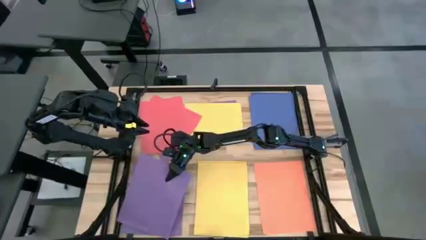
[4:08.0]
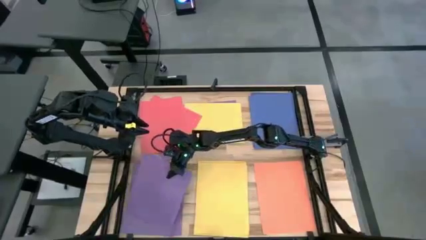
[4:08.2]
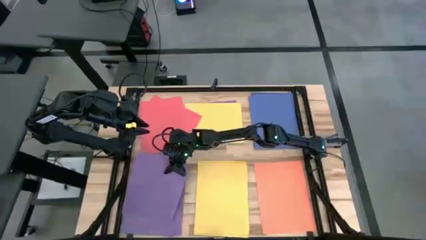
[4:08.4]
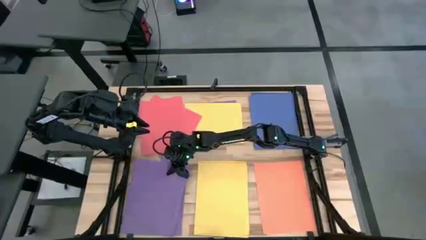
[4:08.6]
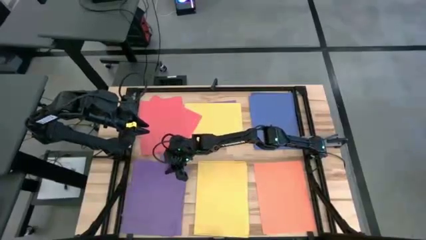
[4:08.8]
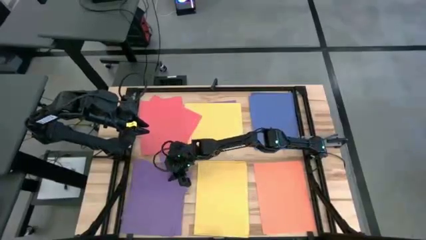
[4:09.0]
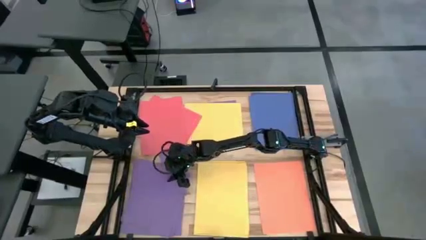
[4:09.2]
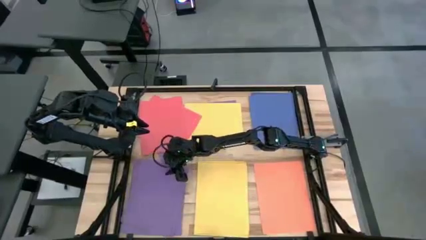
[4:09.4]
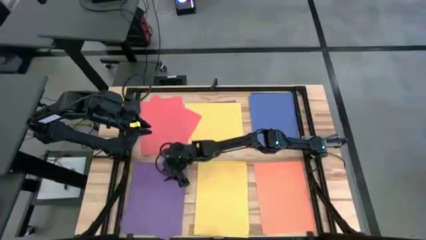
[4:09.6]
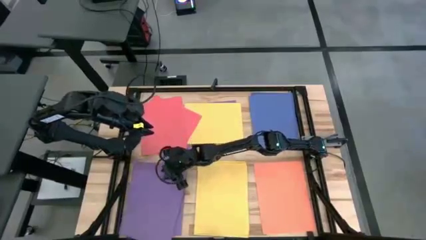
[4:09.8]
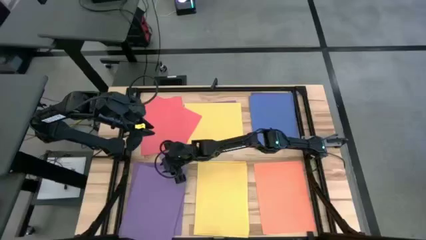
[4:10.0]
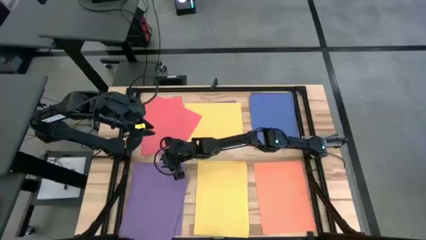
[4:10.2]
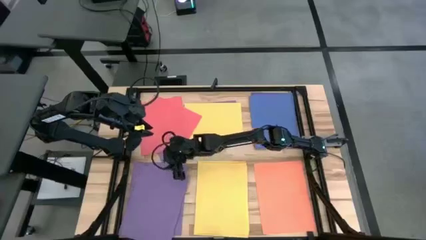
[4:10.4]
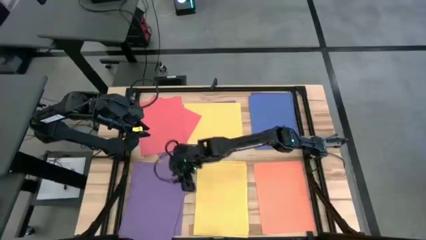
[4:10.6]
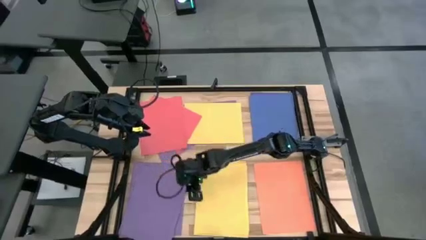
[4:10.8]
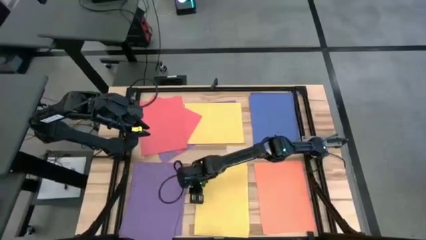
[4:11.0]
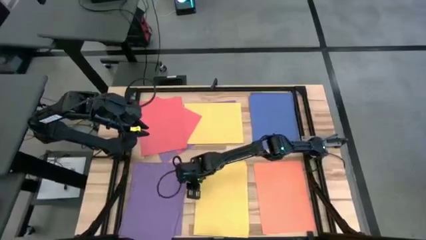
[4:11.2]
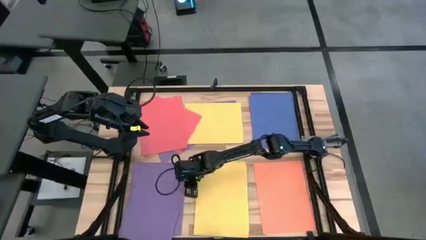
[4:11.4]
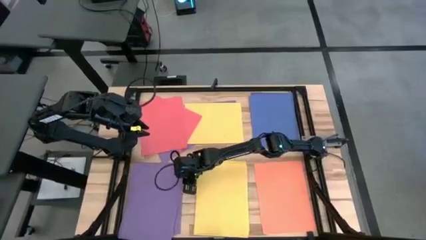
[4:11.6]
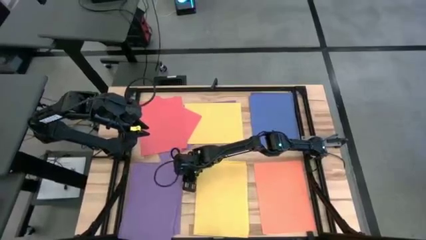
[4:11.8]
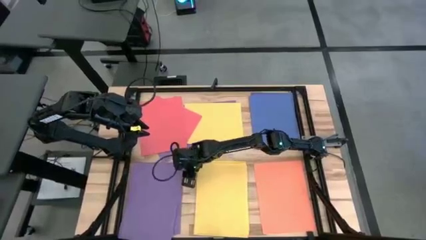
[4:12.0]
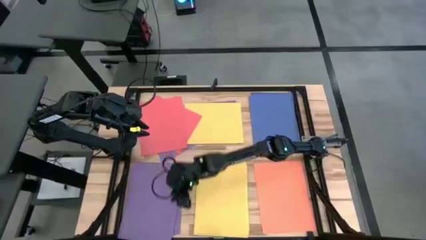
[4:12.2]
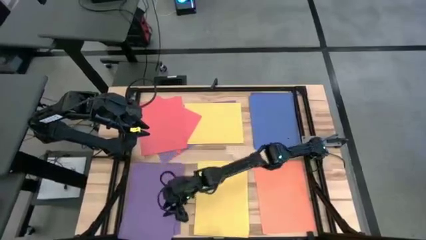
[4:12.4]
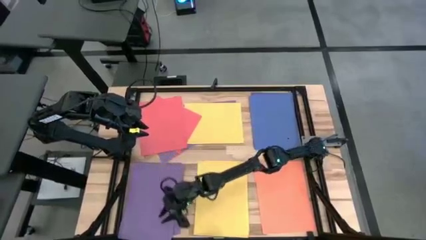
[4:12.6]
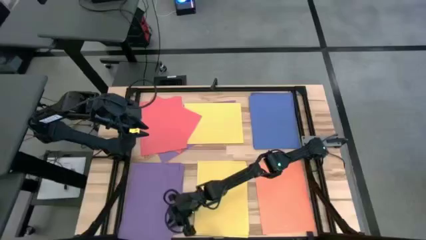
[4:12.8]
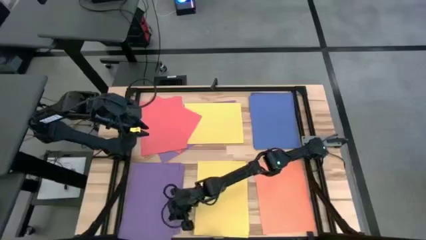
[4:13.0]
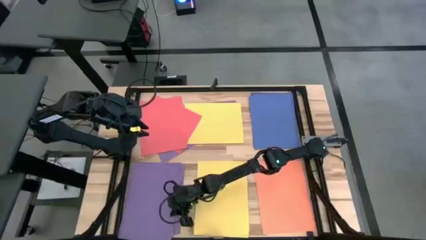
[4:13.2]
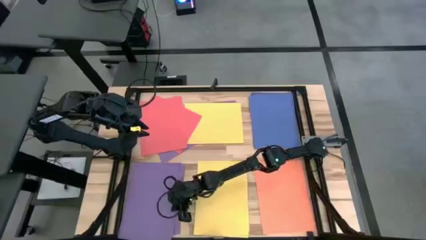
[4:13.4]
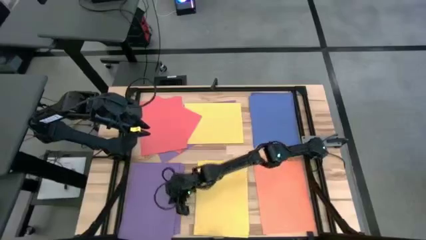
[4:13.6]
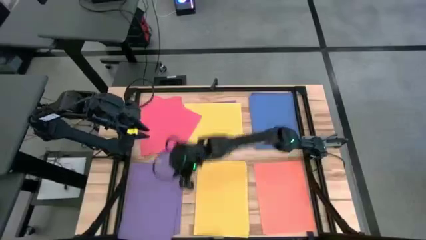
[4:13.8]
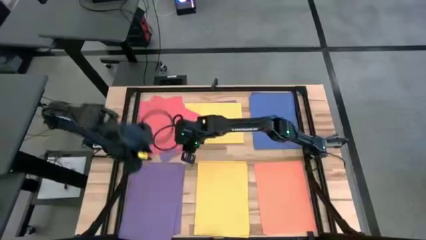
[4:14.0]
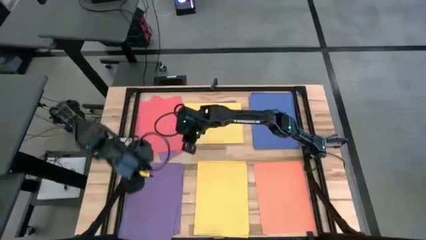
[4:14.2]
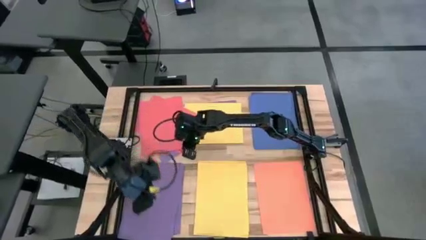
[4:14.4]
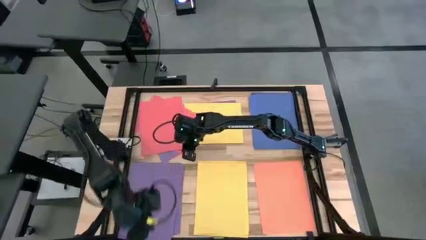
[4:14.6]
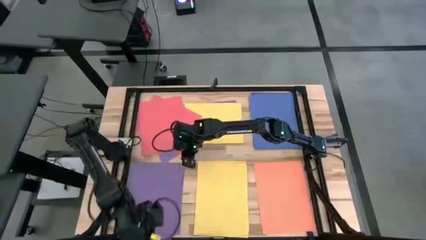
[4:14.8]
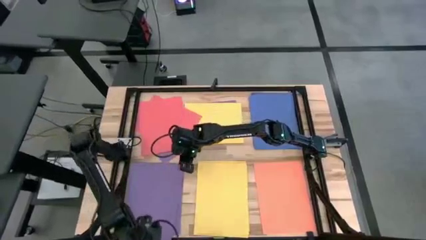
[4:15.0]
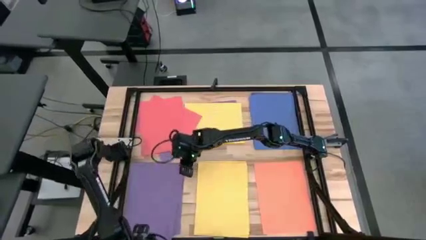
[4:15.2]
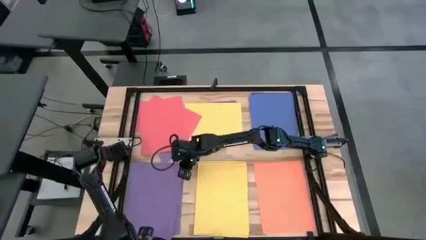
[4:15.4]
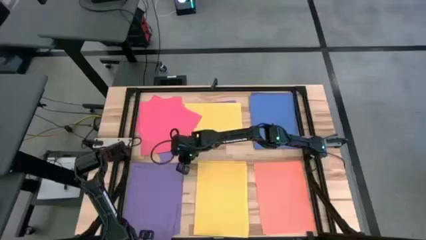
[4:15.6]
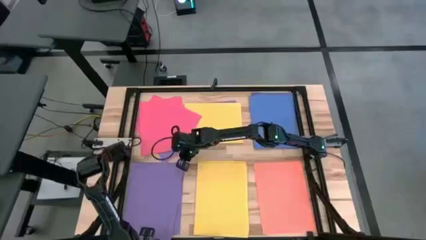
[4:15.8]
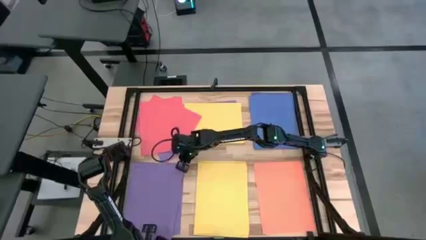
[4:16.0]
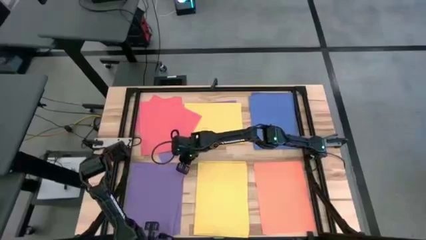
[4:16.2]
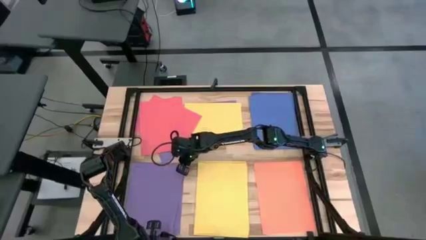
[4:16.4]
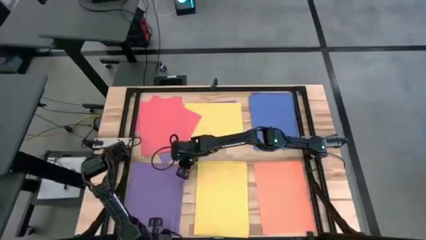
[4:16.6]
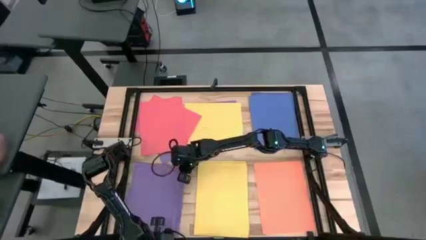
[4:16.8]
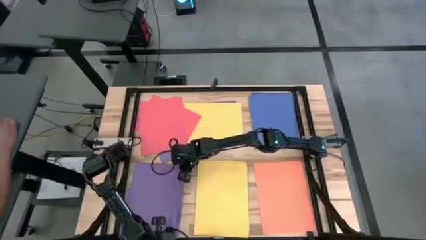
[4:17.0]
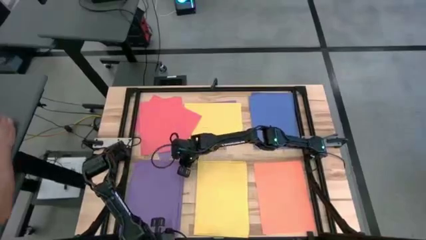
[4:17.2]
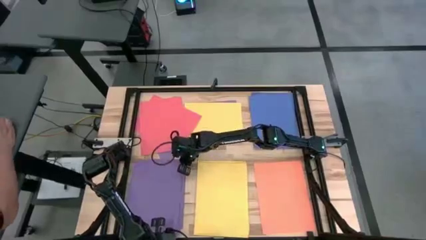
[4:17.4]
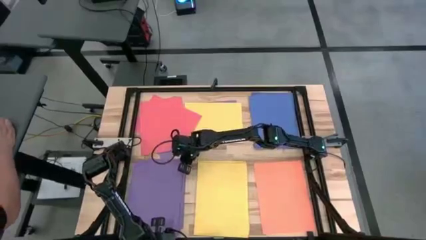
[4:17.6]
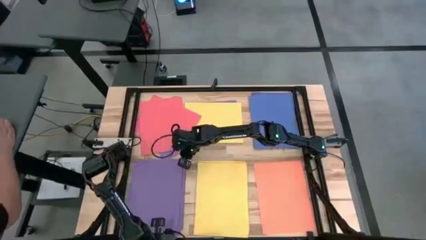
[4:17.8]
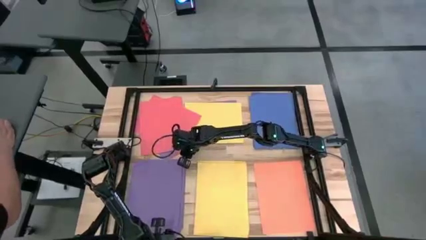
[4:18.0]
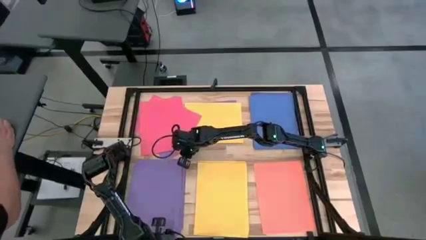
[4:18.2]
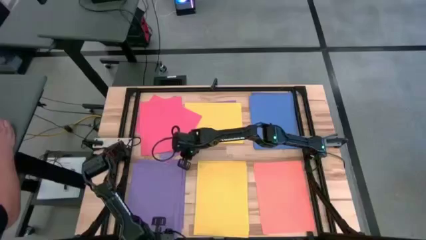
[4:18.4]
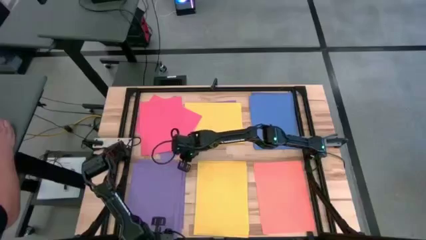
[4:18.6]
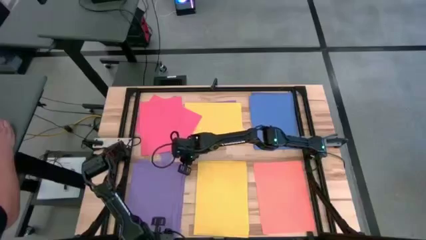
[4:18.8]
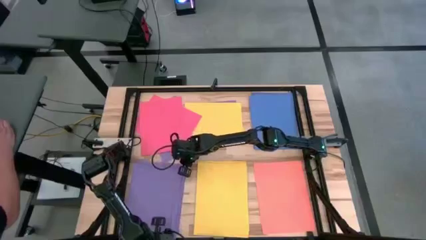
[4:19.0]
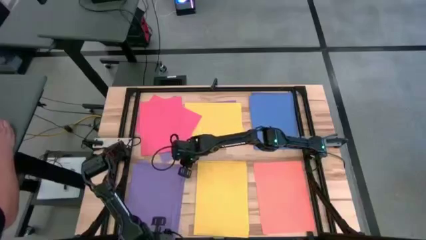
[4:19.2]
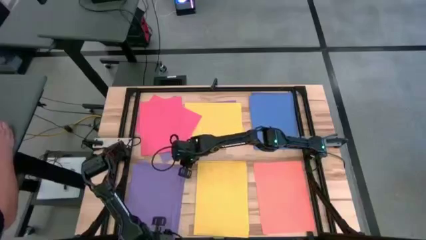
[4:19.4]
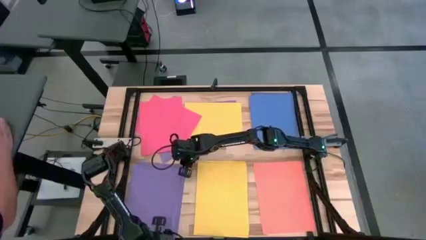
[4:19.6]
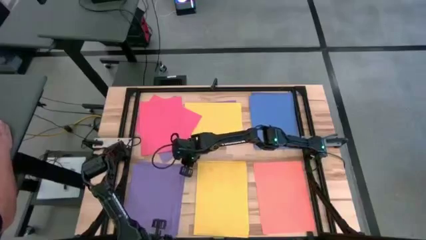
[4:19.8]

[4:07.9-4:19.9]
Task: Organize paper
Stack the purple paper on top of the purple paper
